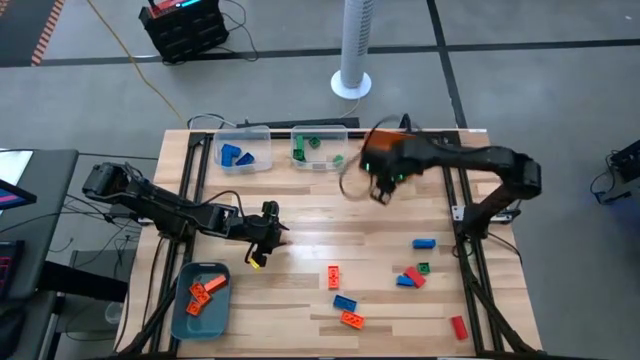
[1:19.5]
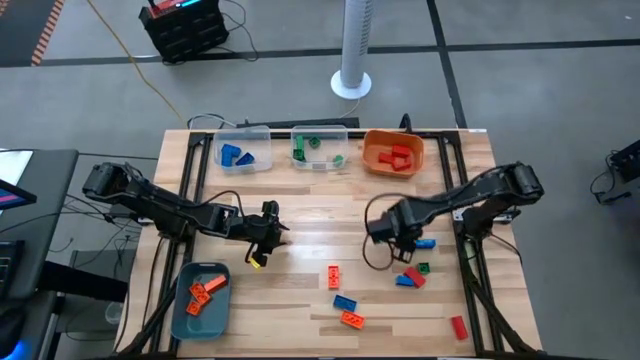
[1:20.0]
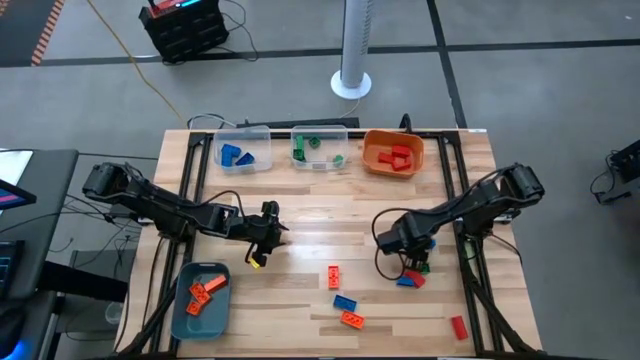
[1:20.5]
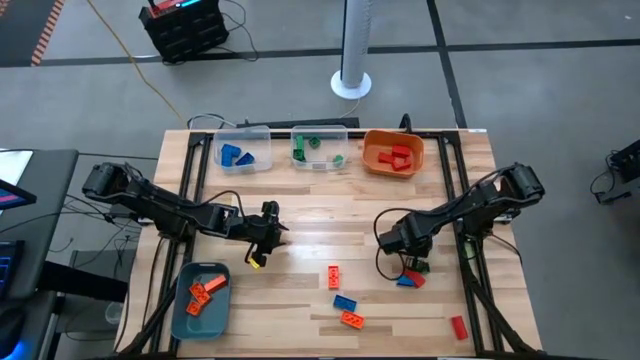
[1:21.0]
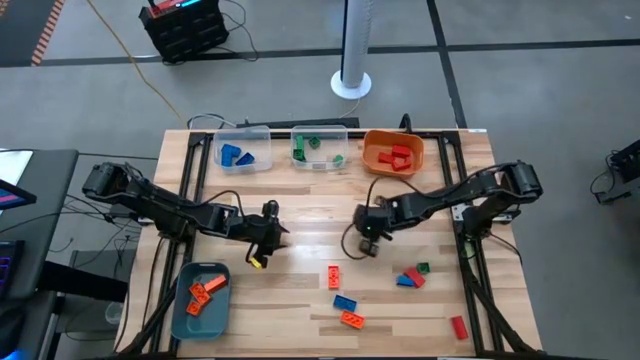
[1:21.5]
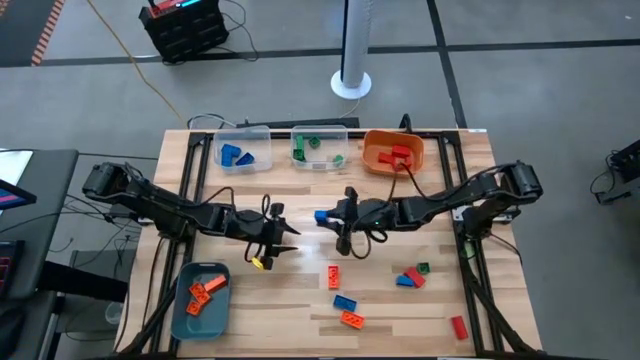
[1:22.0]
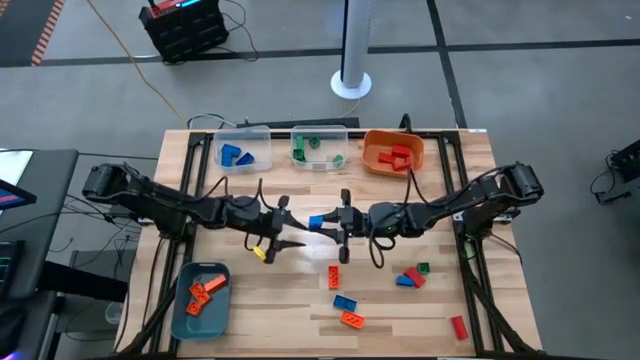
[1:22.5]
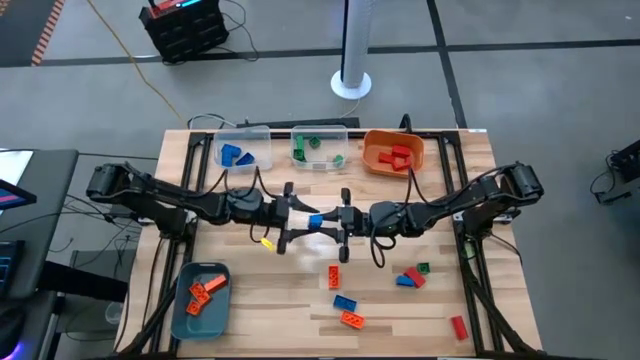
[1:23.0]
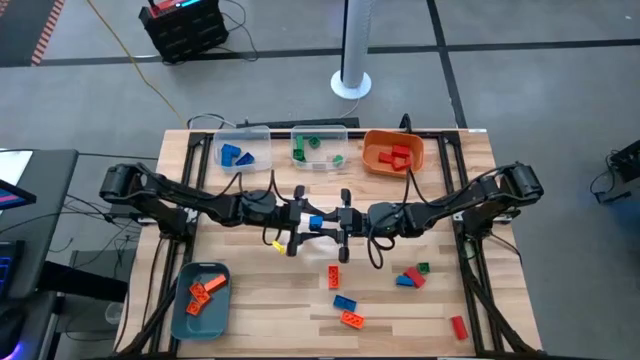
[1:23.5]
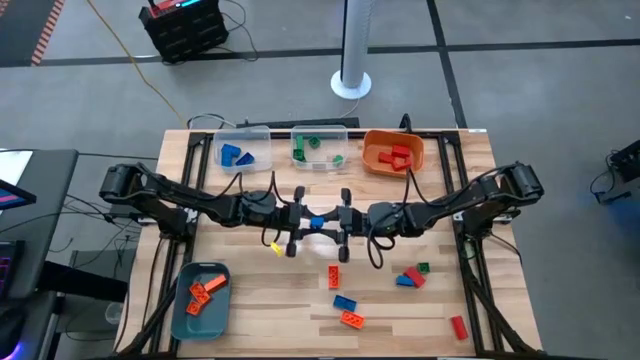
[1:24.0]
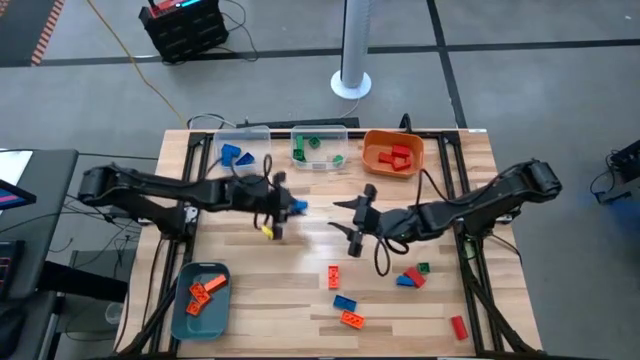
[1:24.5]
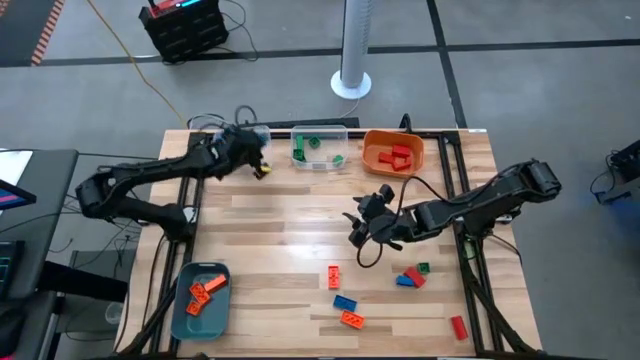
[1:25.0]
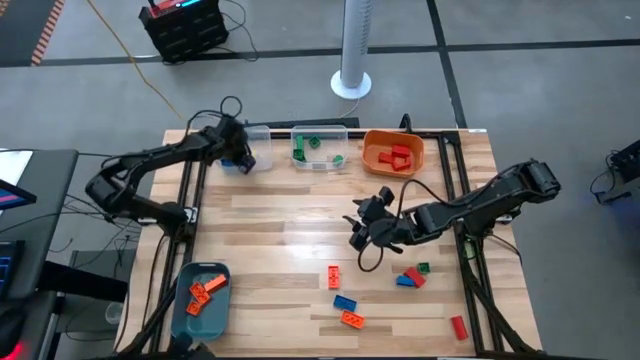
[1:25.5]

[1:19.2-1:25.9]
Task: Sort blocks
Put the blue game piece into the left transparent bin

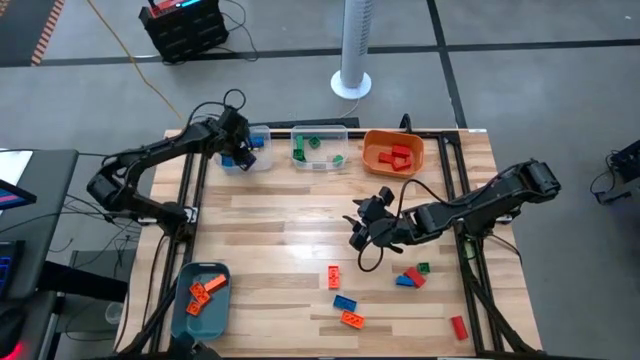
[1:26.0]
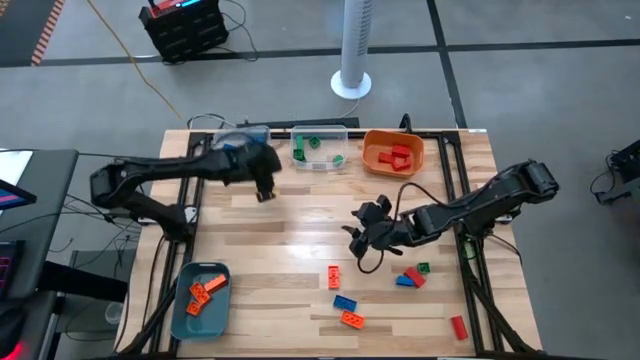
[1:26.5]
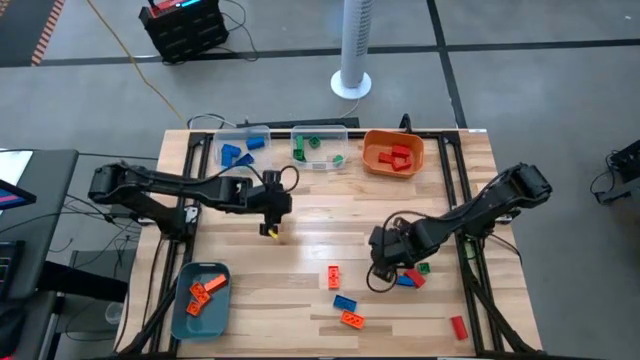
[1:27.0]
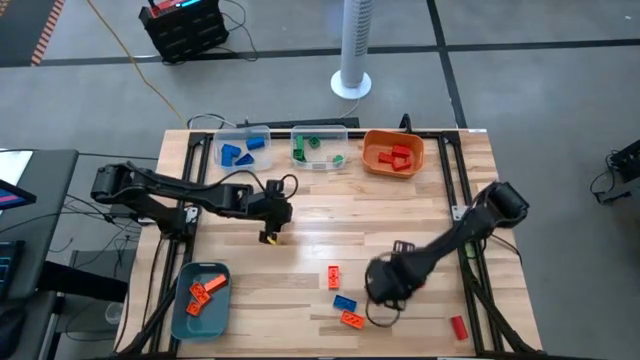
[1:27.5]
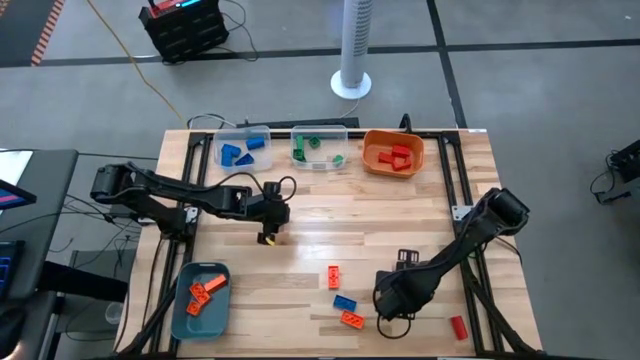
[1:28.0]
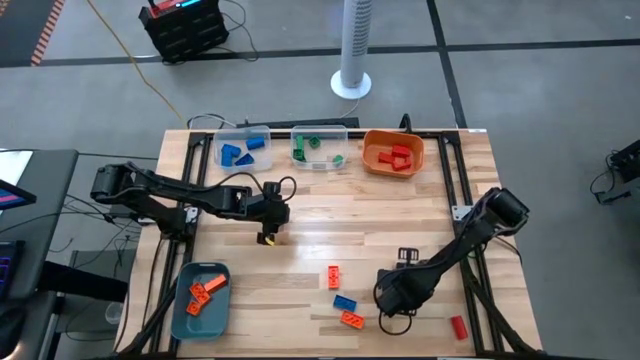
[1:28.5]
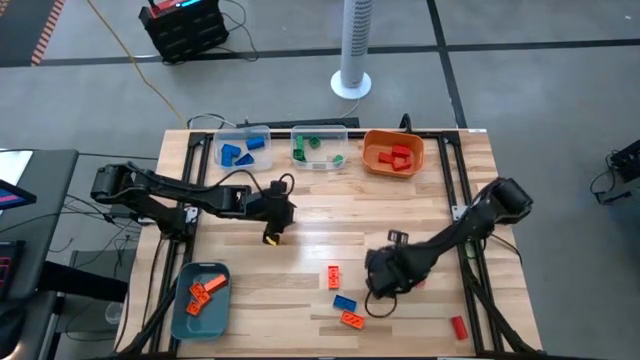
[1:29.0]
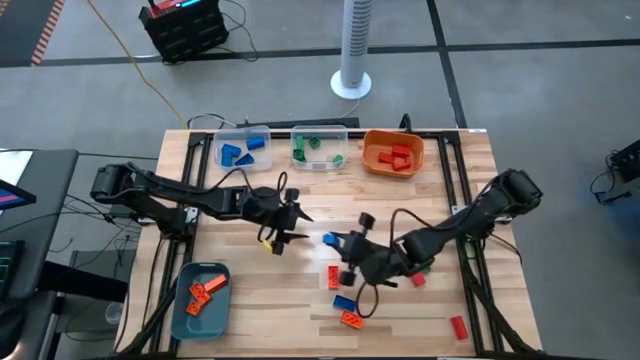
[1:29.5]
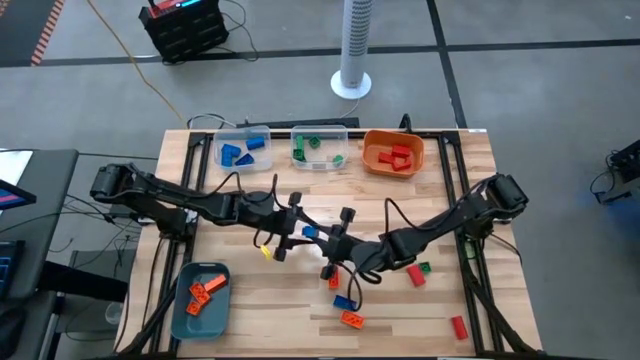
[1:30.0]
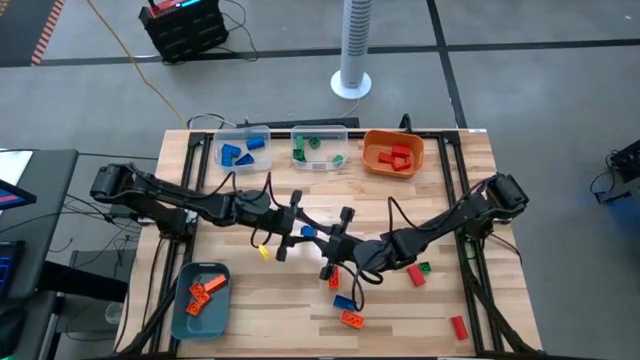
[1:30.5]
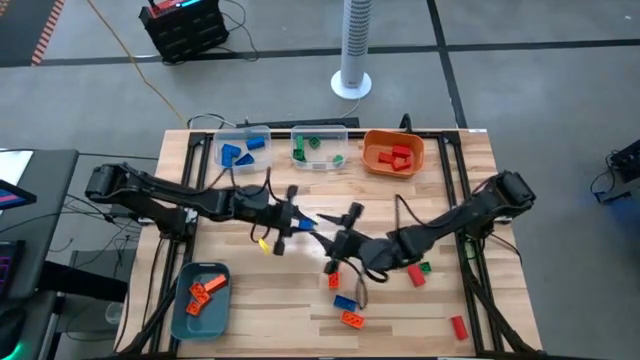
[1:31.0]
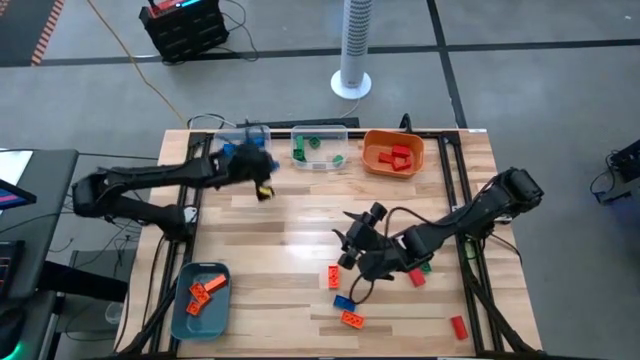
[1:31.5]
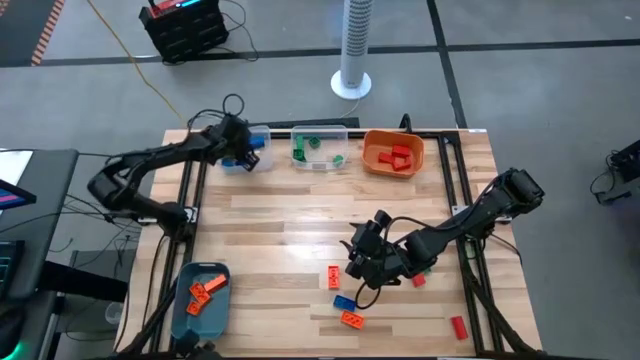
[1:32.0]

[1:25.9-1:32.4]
Put the blue game piece into the left transparent bin

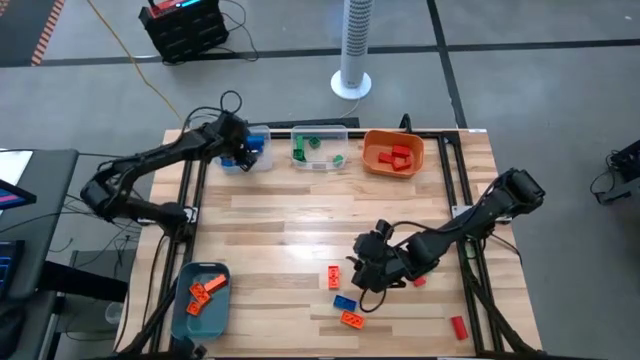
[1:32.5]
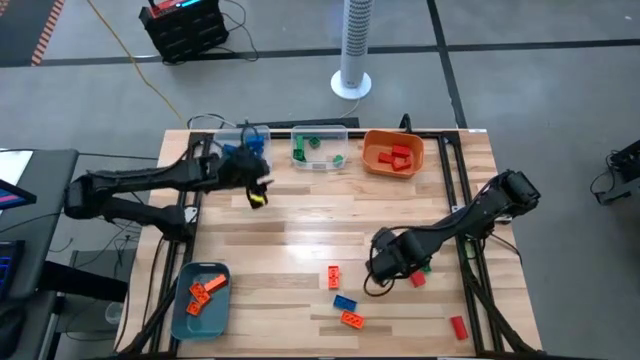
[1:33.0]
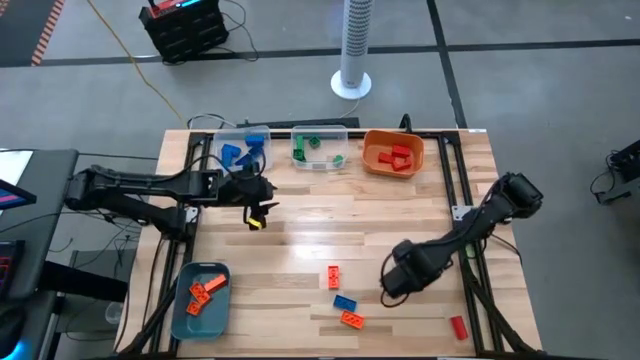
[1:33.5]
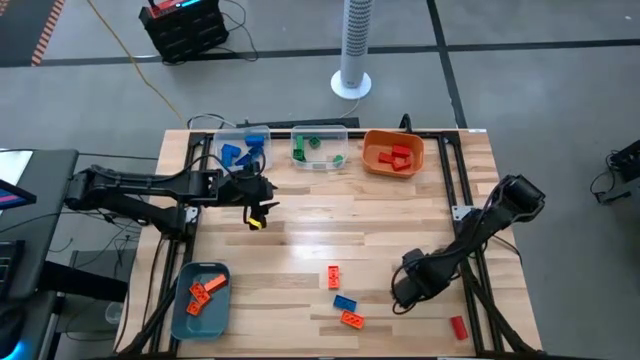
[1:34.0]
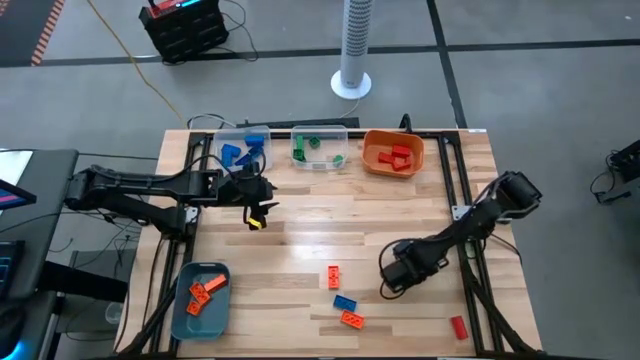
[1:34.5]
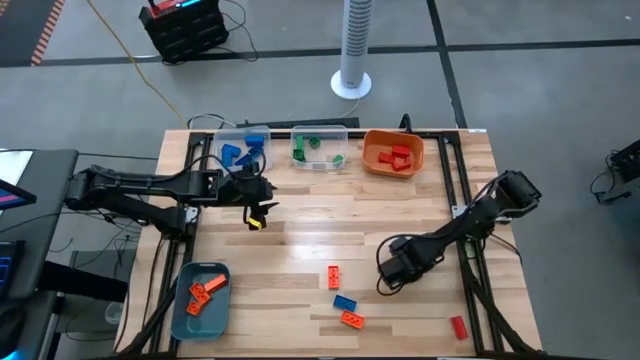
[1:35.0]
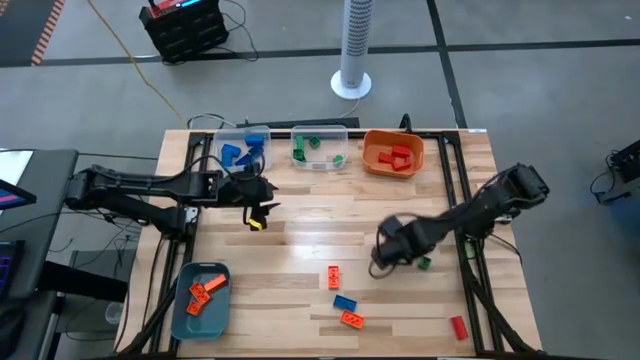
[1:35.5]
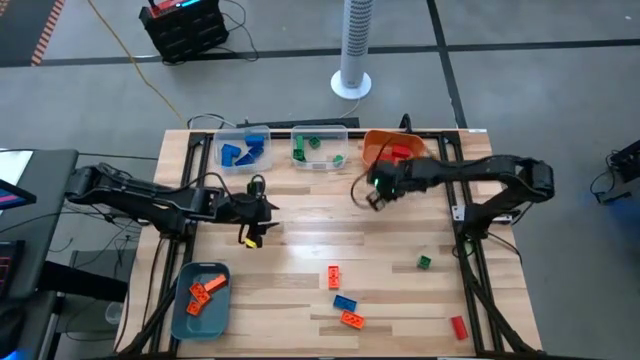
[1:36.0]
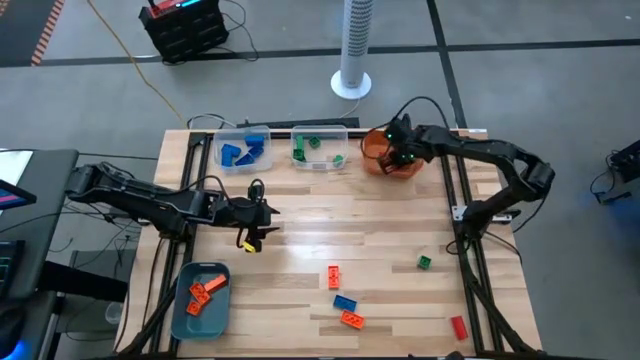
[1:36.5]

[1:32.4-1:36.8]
Put the red block into the orange bin

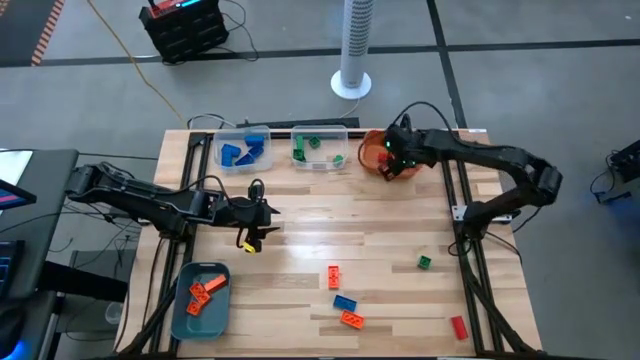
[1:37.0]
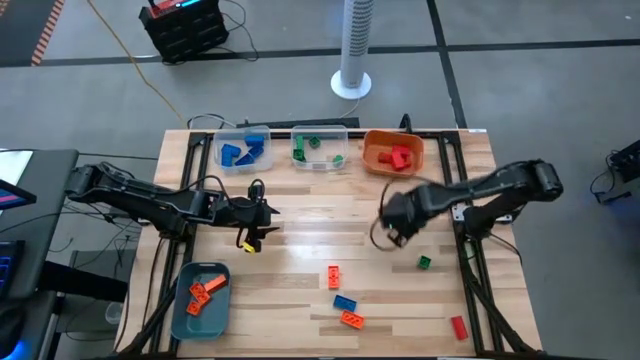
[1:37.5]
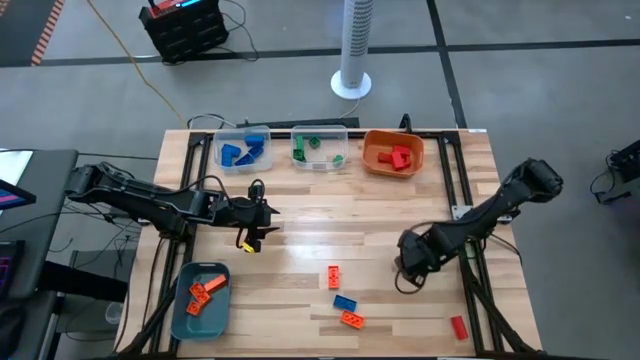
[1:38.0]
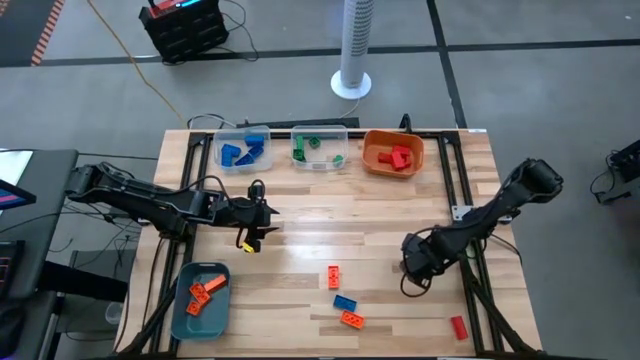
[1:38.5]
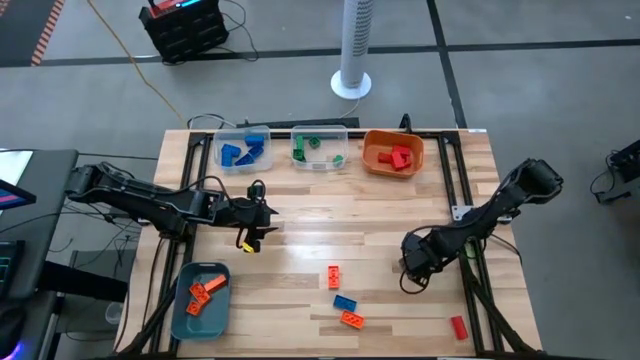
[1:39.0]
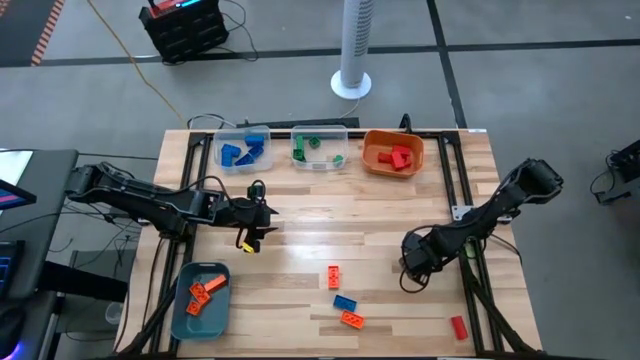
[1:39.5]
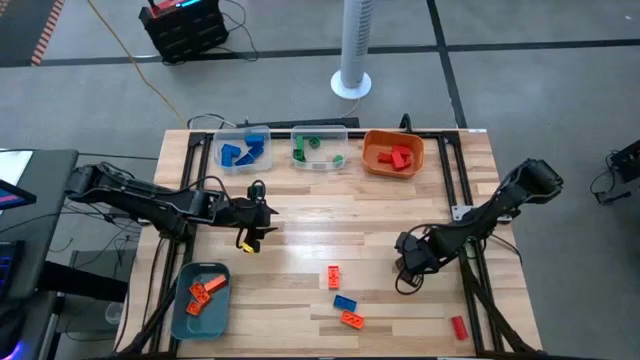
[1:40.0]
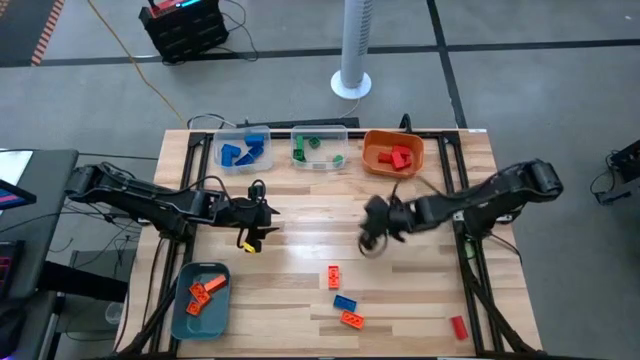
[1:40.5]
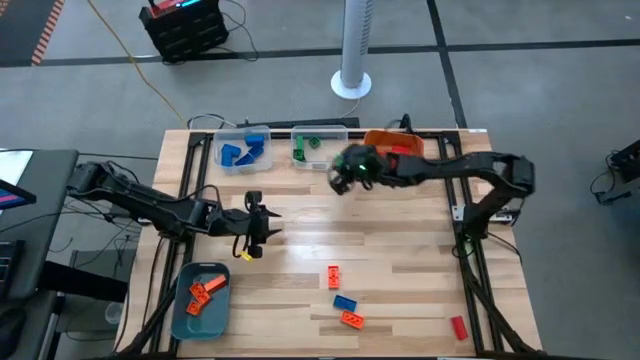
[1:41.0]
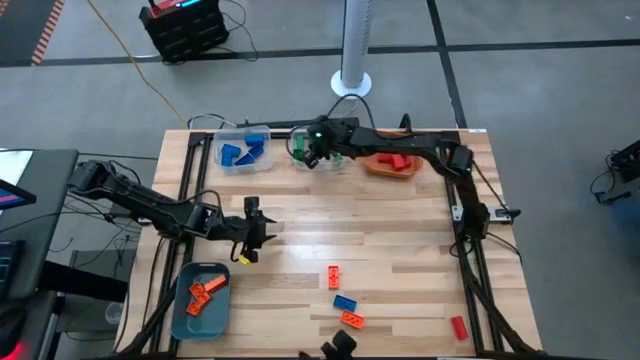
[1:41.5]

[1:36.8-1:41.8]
Put the top green game piece into the right transparent bin
